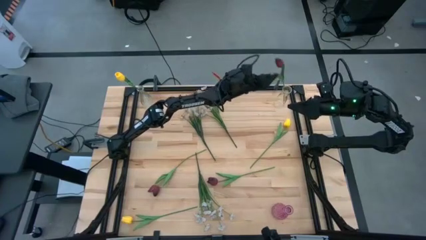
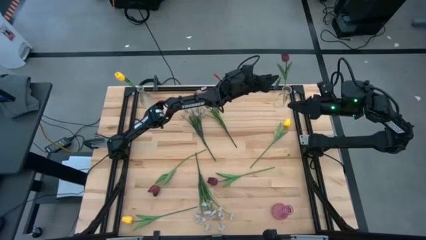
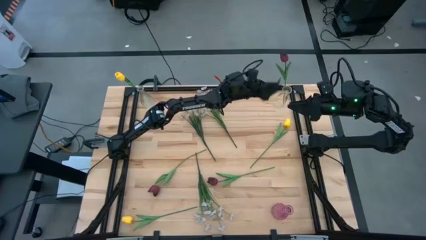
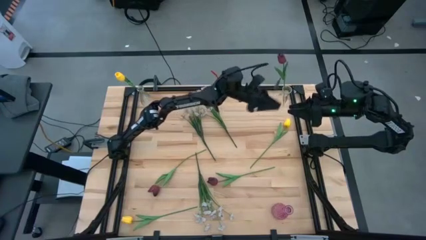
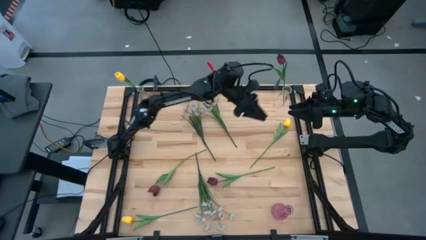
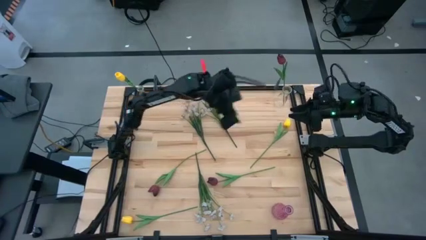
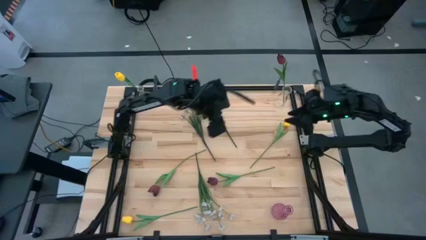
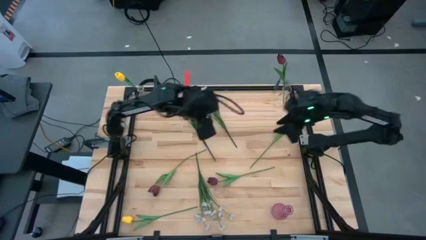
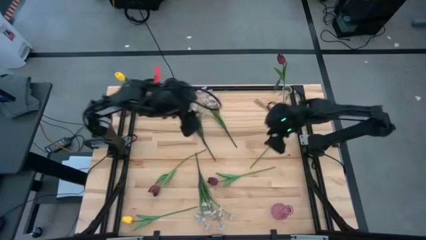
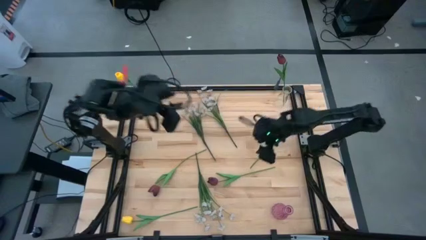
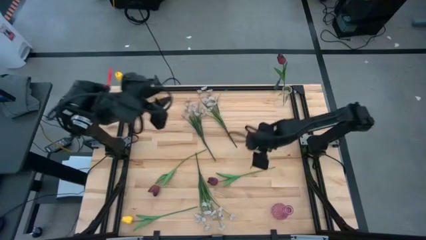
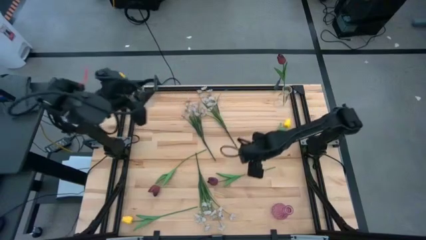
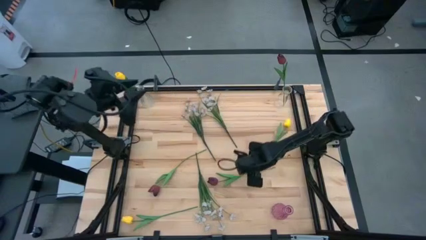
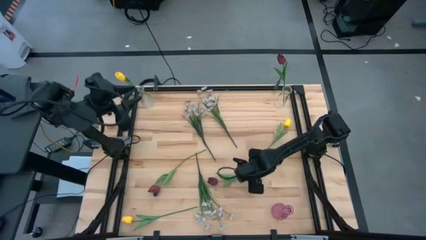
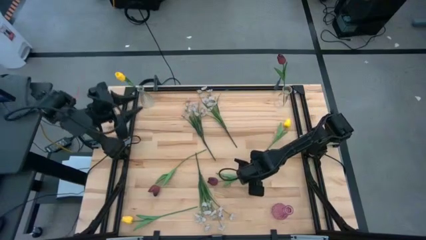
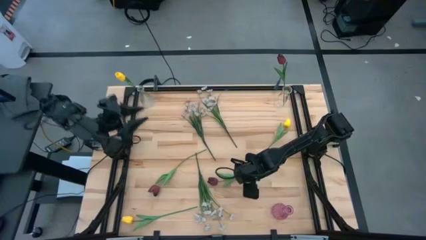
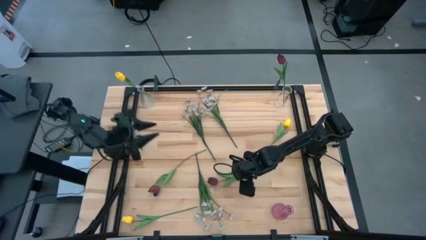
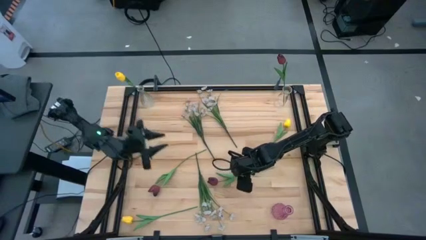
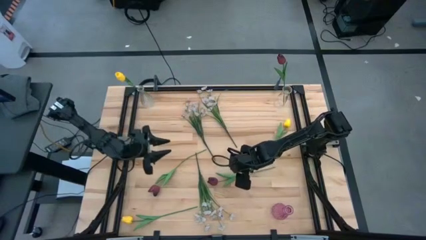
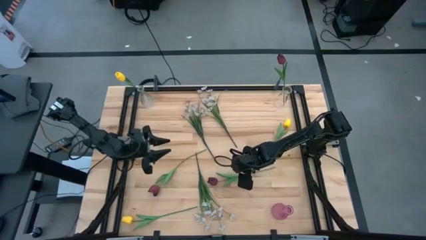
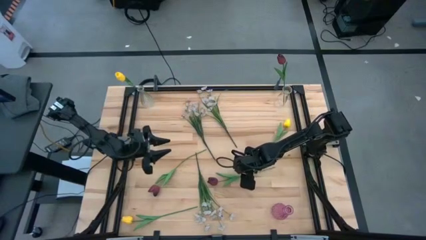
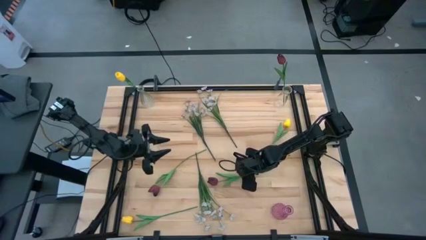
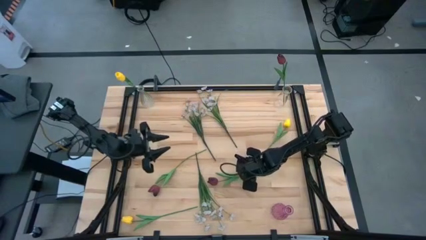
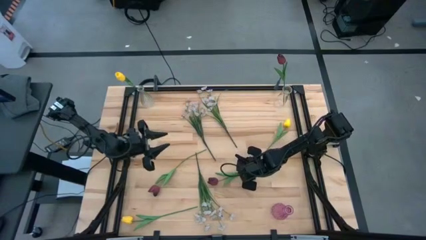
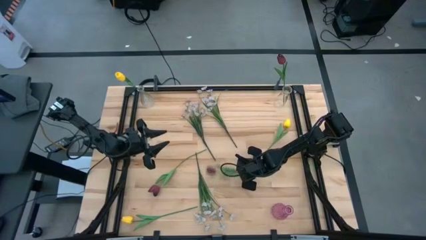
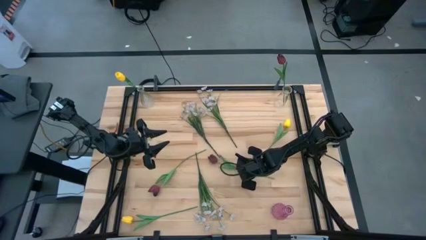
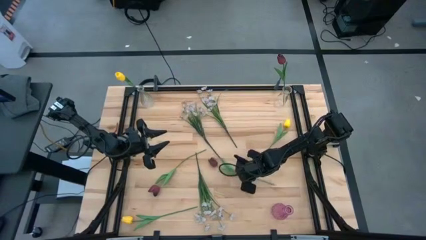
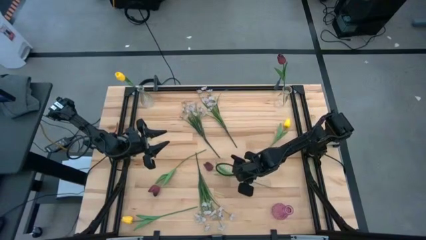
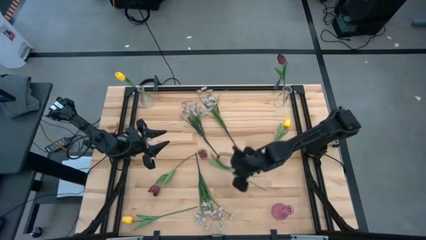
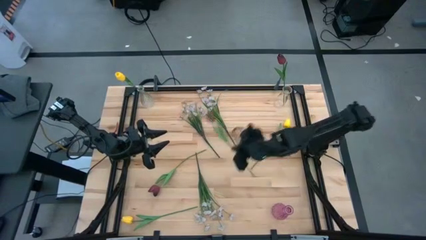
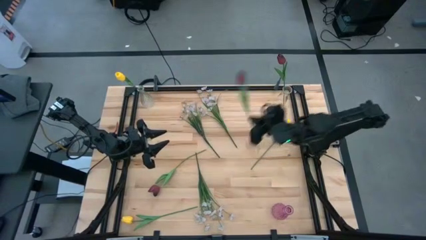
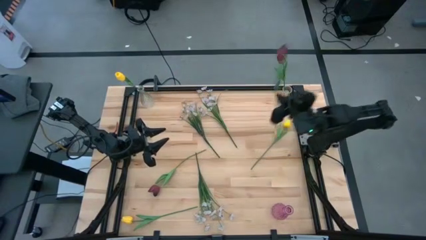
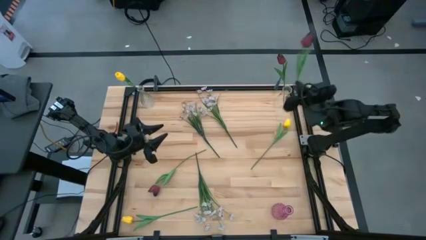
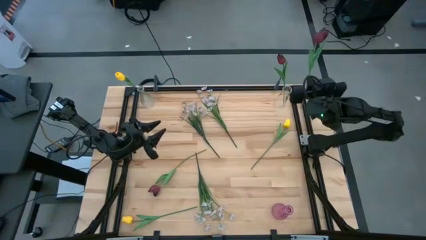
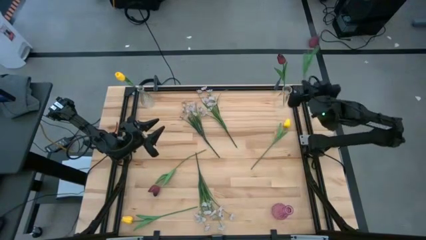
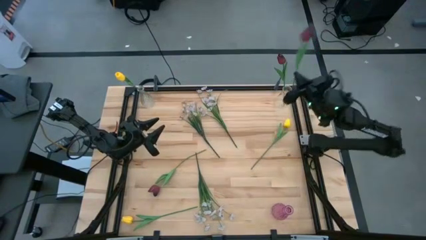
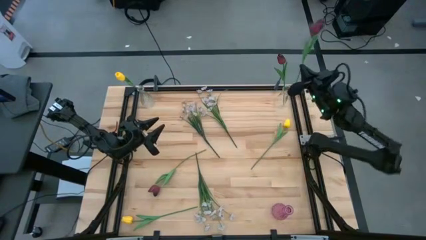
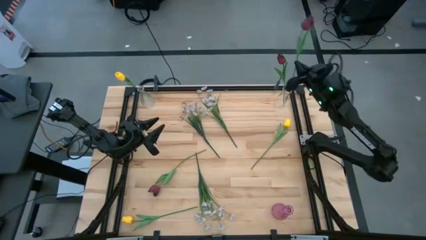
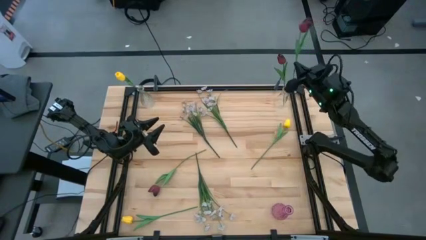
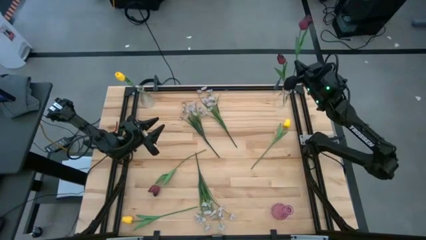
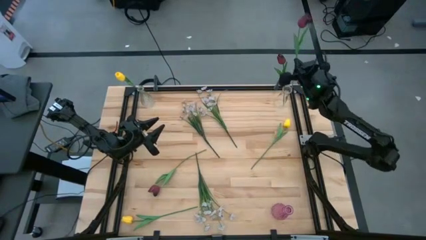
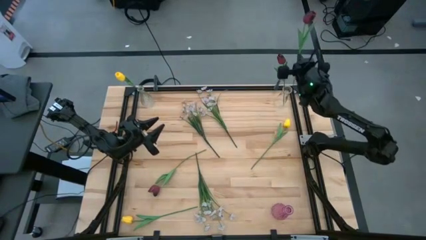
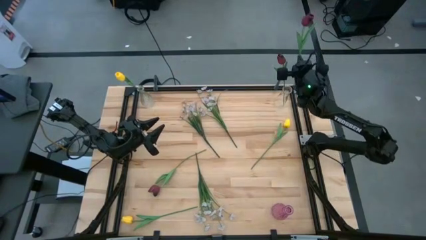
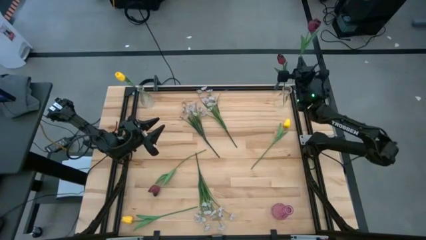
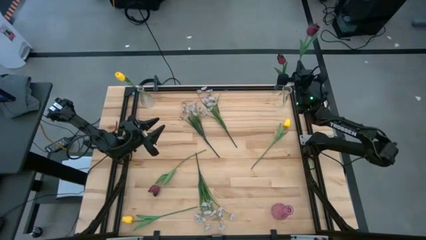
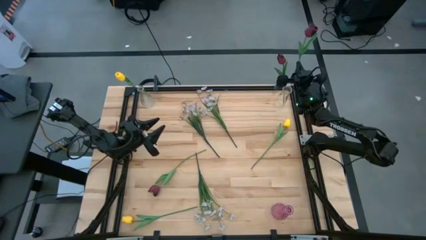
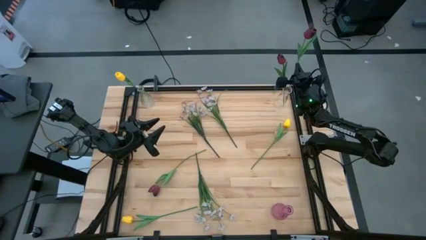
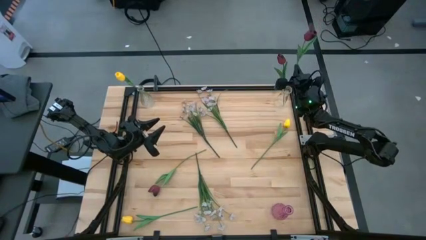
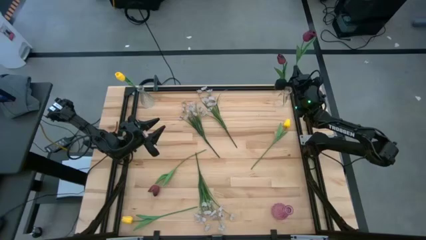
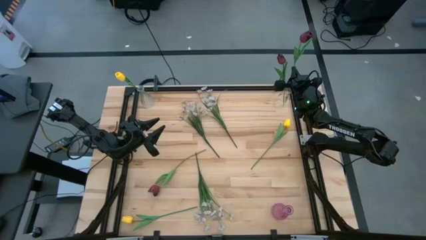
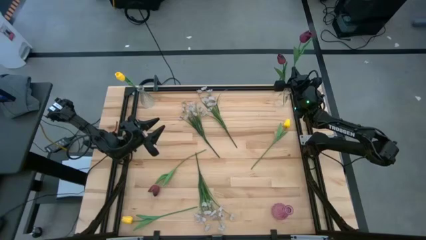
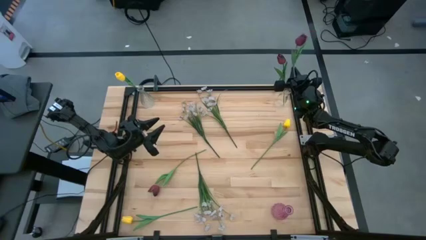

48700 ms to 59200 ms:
Task: Sort flowers into vase by color
Put the right red flower into the right transparent vase
